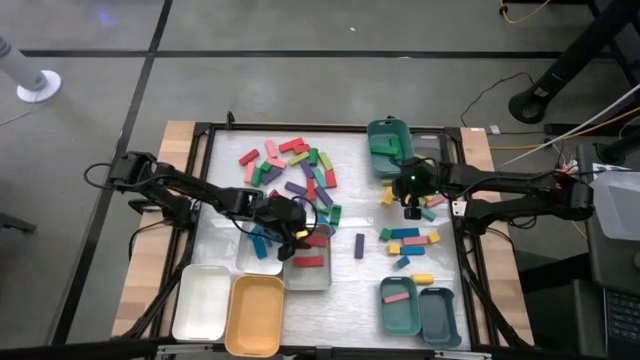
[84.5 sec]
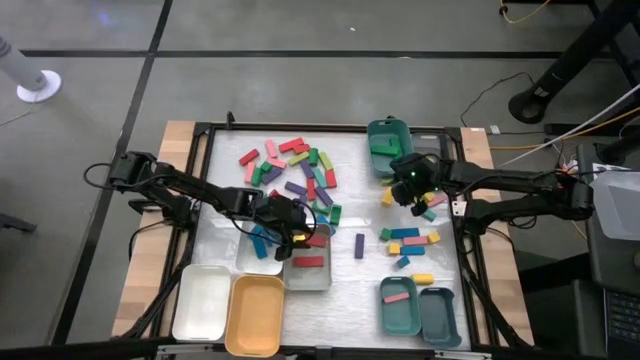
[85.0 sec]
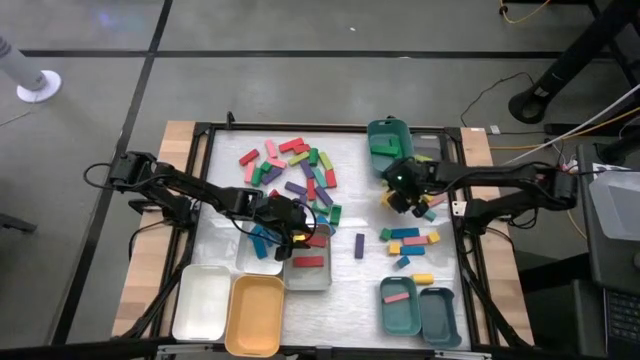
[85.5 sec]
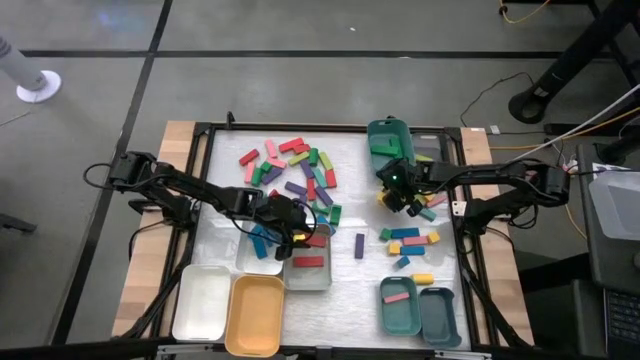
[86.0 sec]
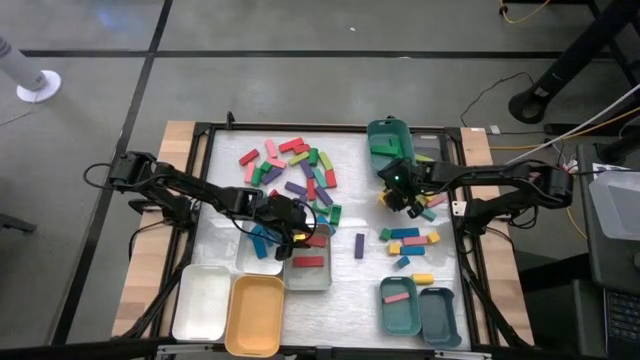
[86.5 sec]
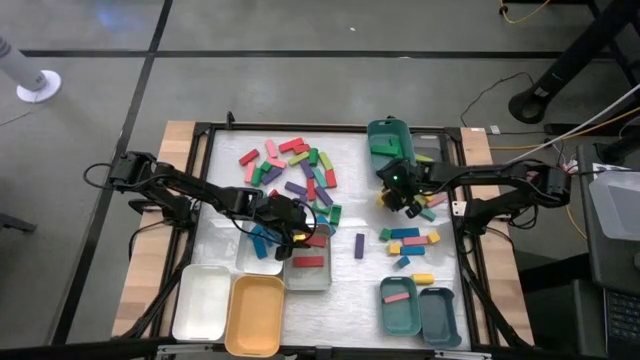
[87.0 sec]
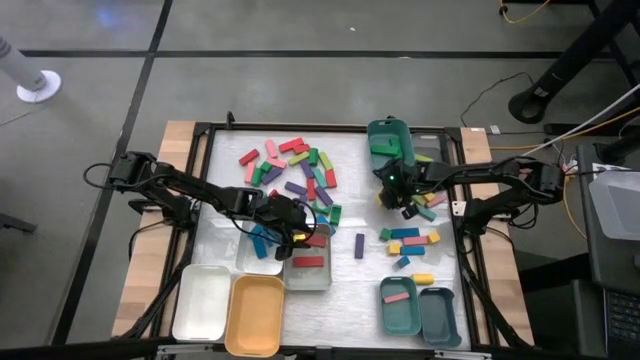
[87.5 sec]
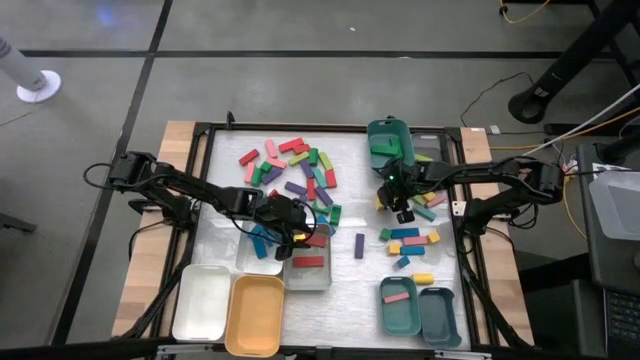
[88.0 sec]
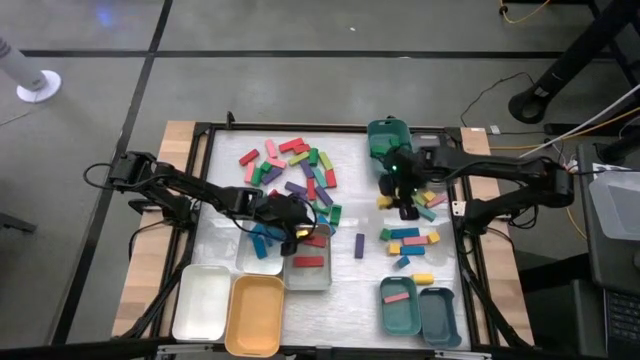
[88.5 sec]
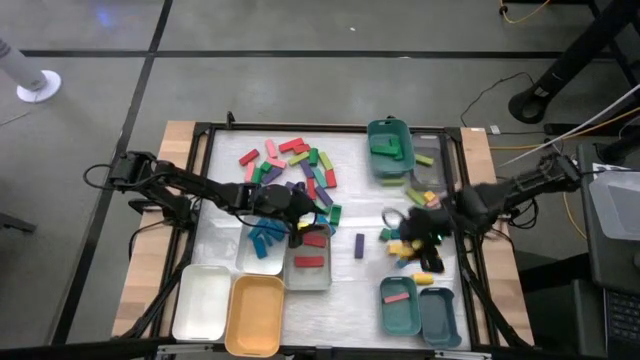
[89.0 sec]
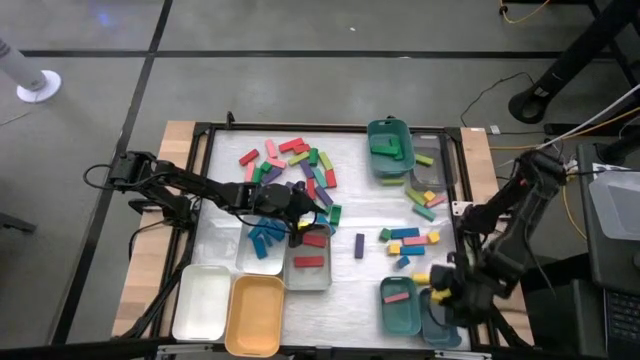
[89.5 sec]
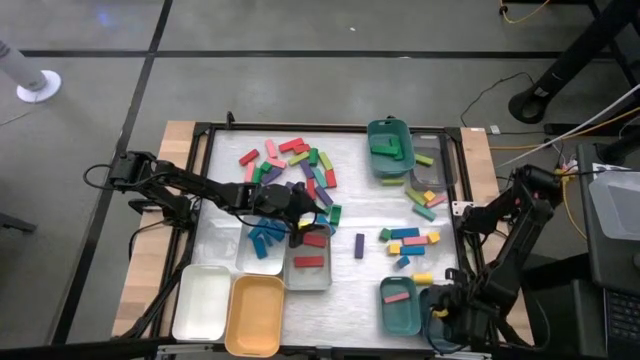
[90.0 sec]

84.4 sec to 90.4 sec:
Task: Sort blocks
Put the yellow block into the dark blue bin

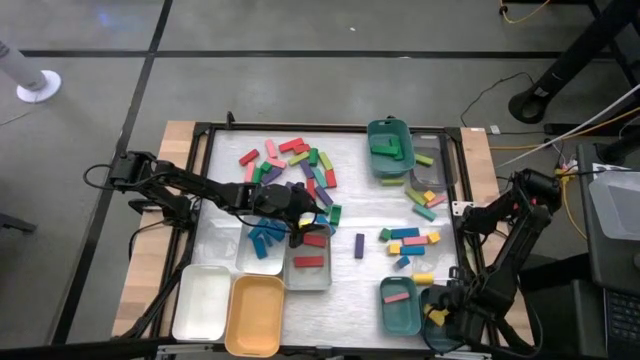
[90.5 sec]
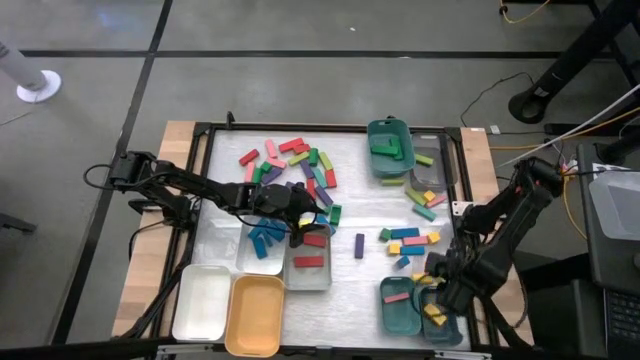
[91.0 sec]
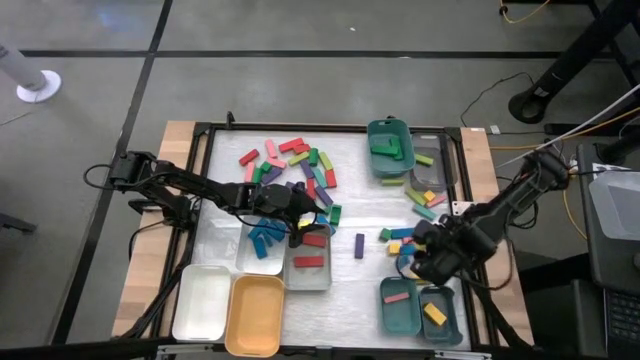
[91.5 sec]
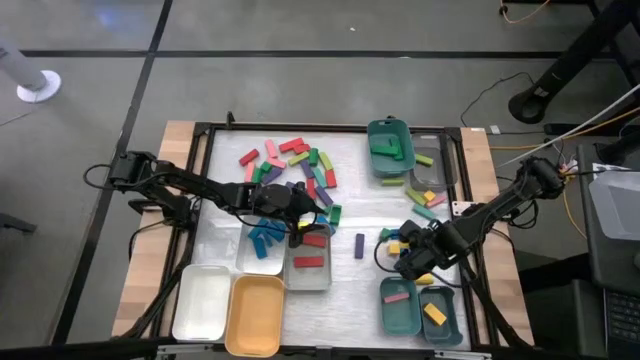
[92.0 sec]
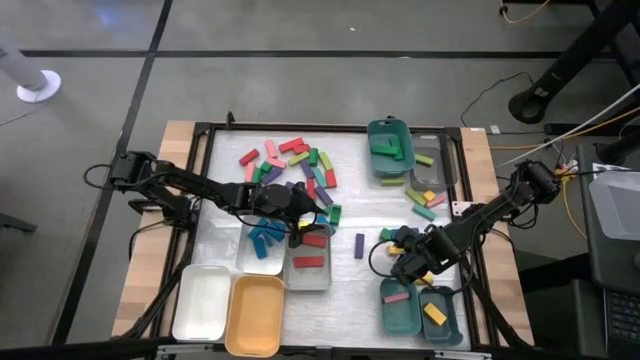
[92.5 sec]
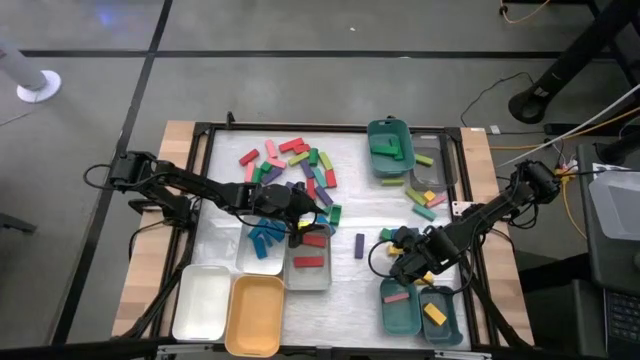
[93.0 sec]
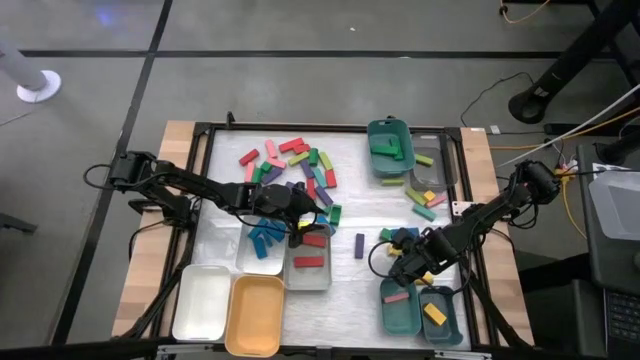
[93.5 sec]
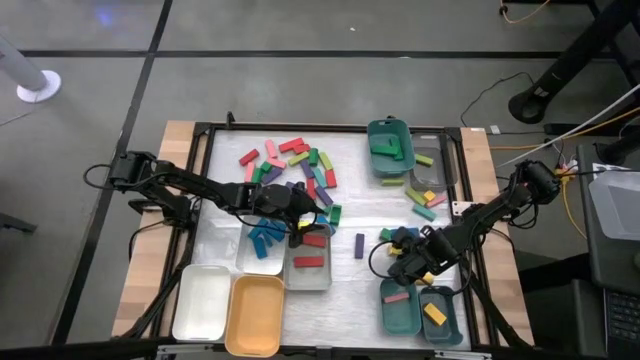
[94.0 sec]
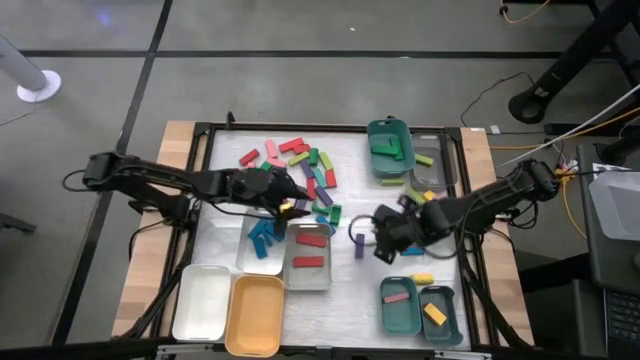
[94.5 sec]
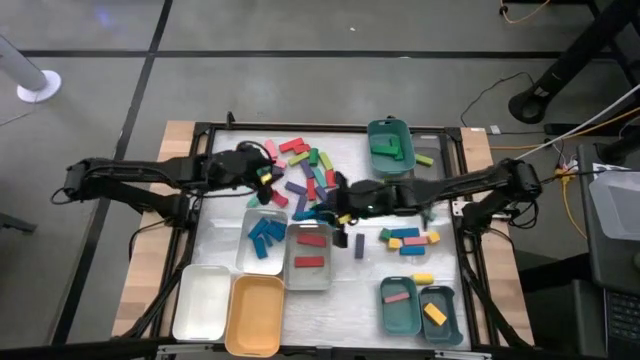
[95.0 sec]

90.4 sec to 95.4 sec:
Put the blue block into the top white bin

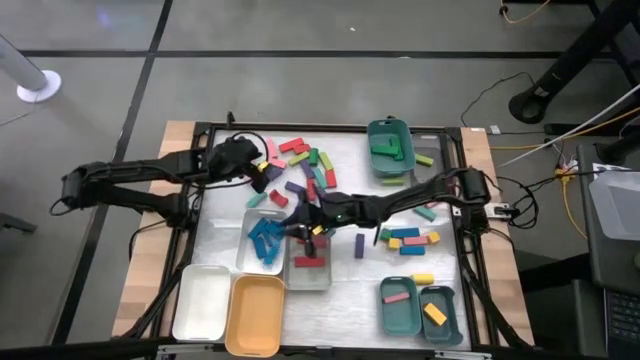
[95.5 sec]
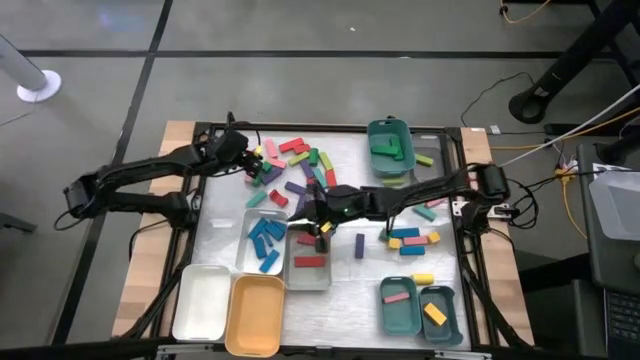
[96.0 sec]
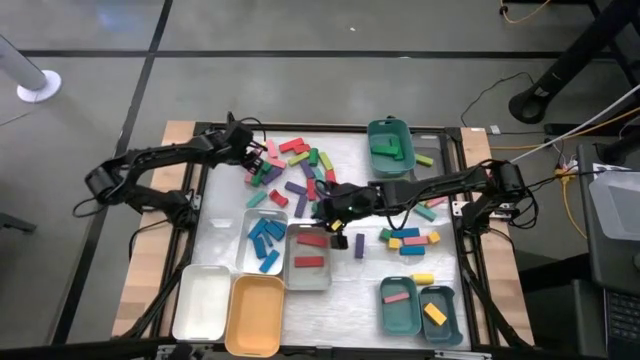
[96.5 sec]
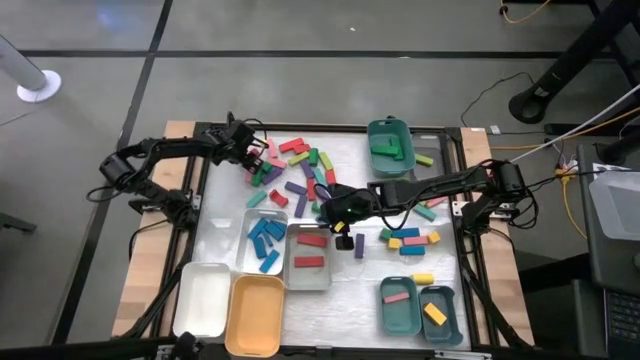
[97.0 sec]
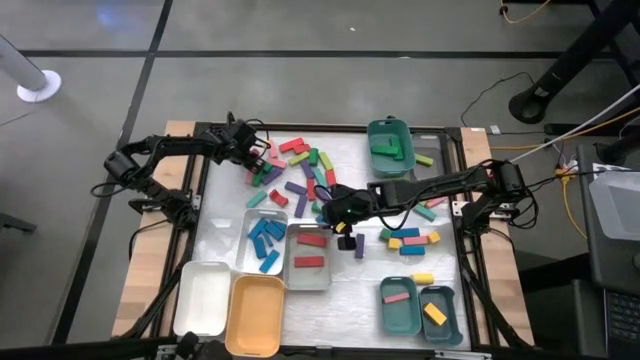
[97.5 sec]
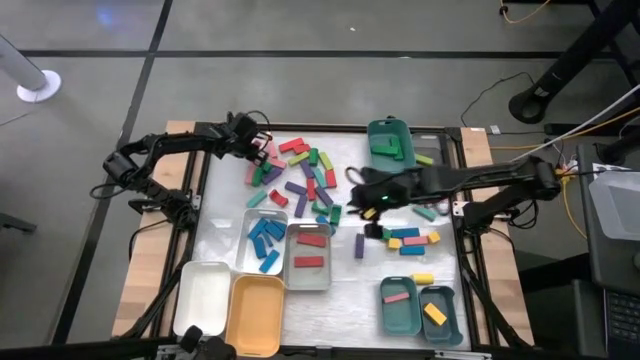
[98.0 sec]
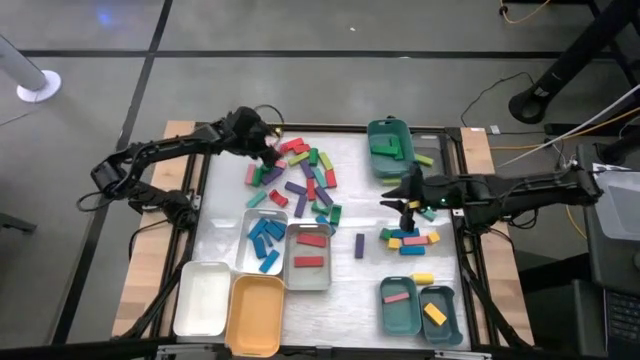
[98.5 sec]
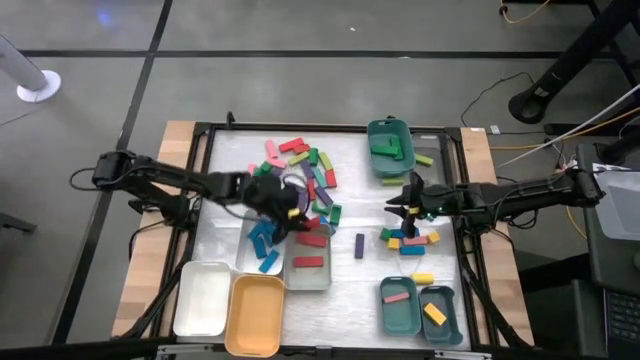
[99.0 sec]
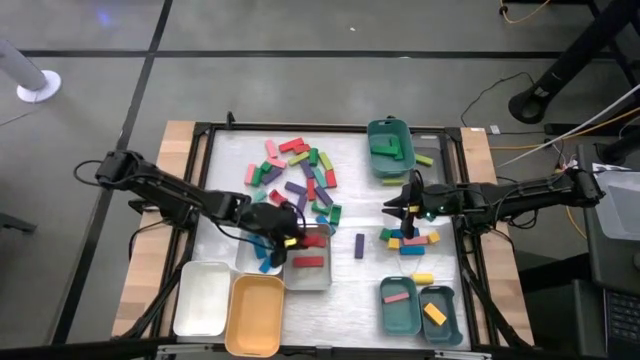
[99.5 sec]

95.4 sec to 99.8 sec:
Put the red block into the gray bin

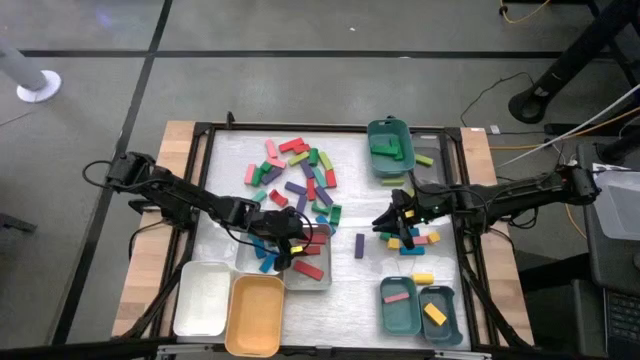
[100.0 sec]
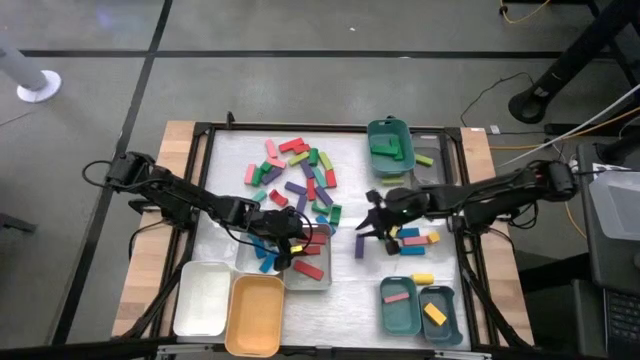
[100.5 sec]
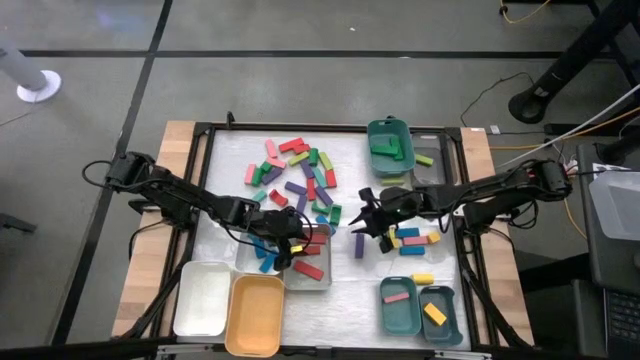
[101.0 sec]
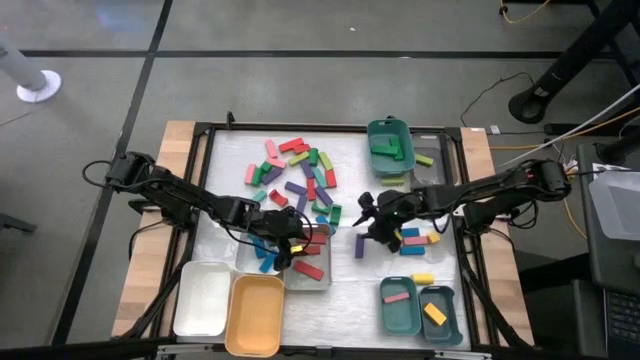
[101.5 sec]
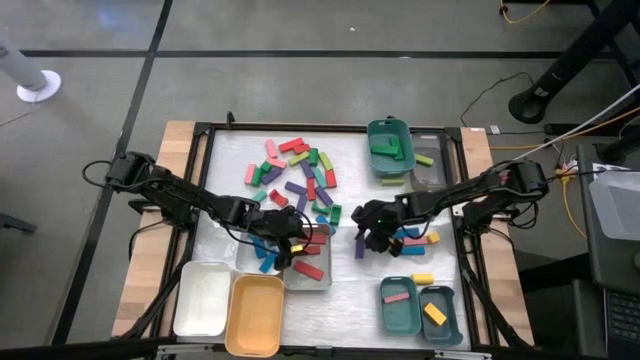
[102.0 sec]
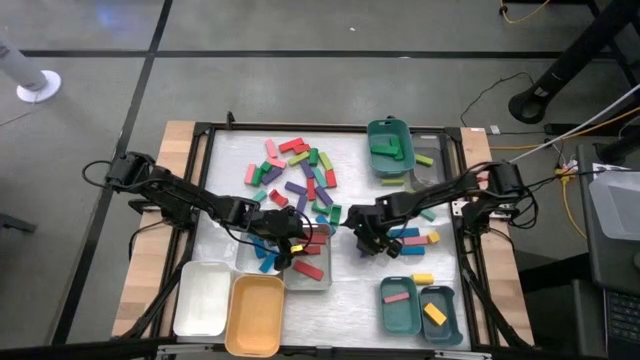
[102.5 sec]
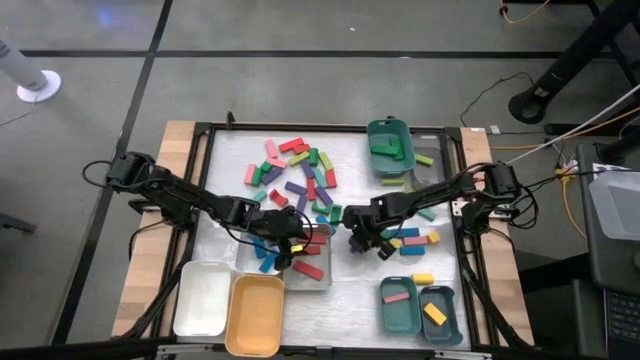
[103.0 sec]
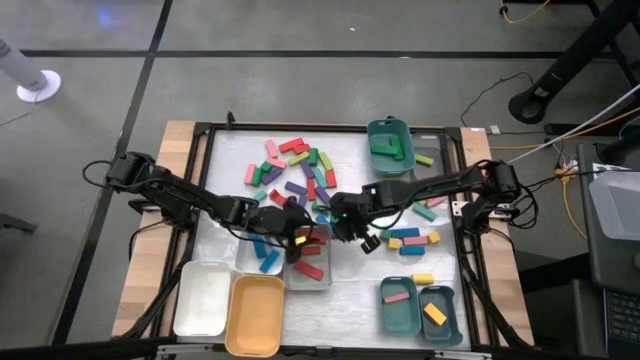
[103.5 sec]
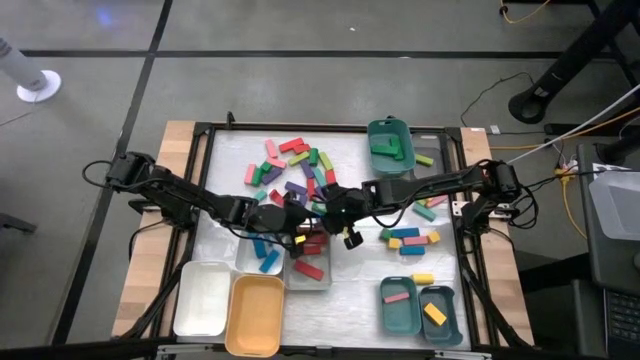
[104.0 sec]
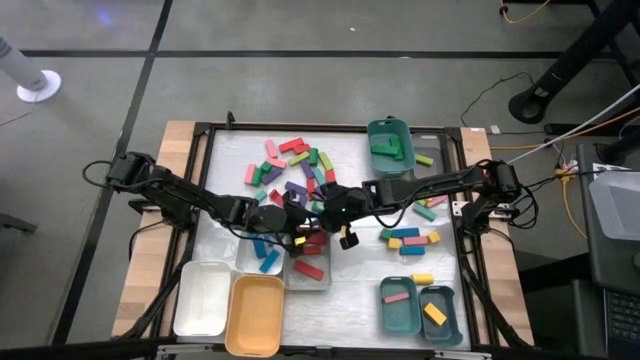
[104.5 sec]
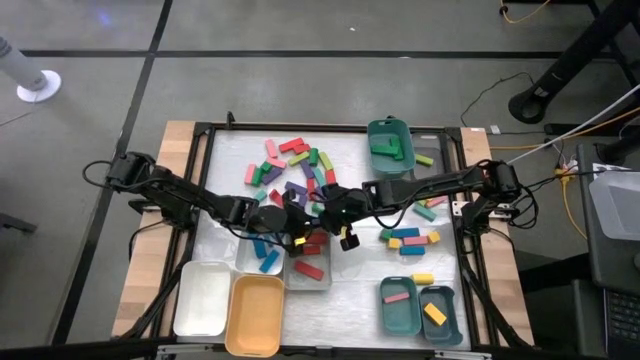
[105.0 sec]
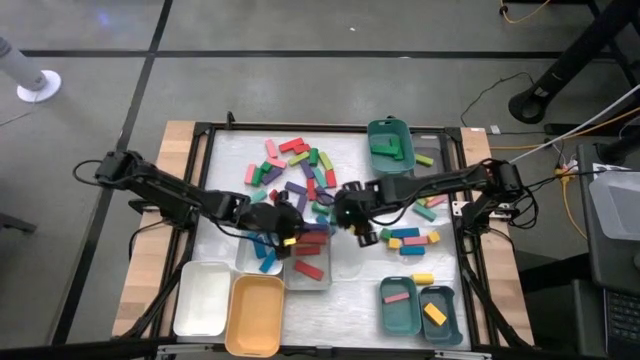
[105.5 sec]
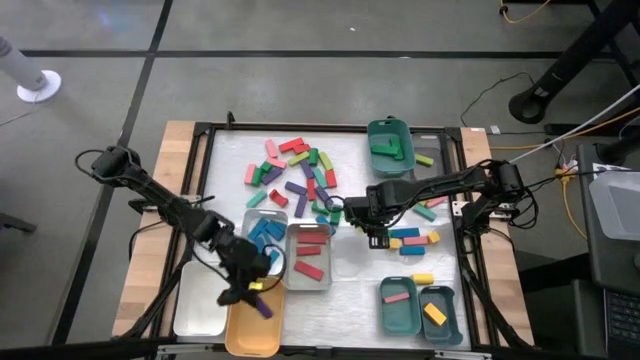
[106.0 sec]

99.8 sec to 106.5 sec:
Put the purple block into the yellow bin
